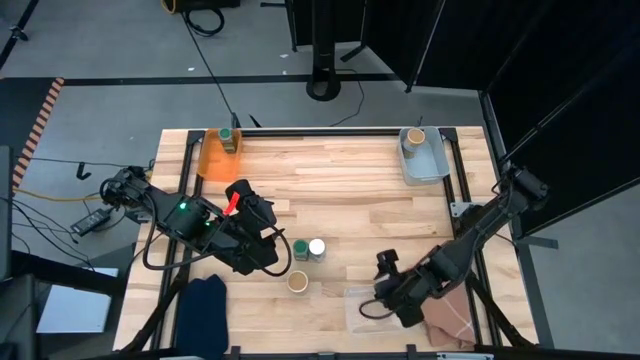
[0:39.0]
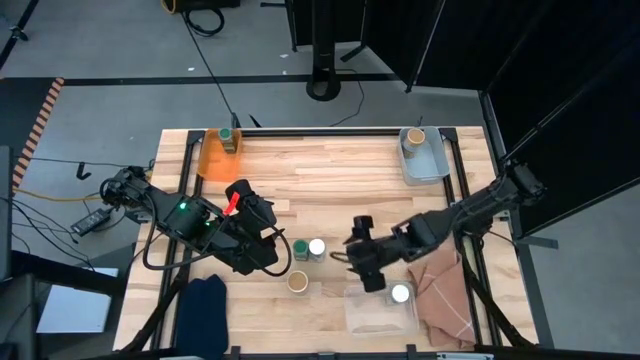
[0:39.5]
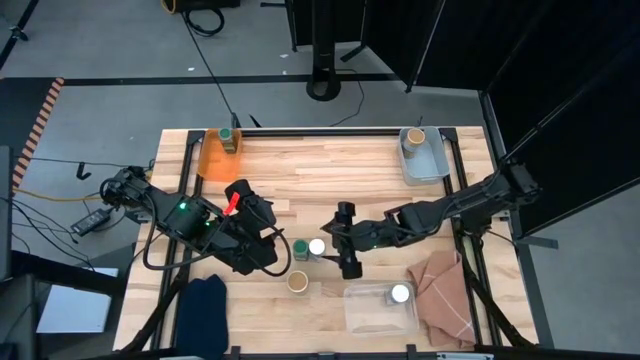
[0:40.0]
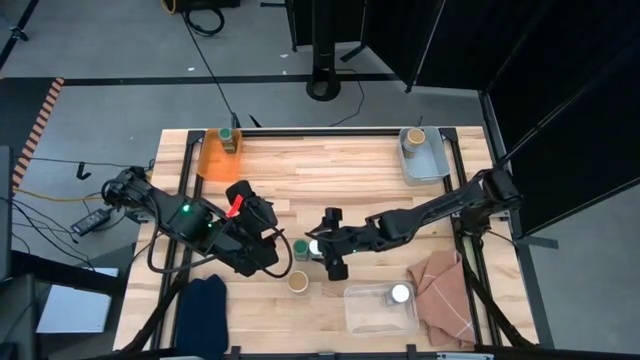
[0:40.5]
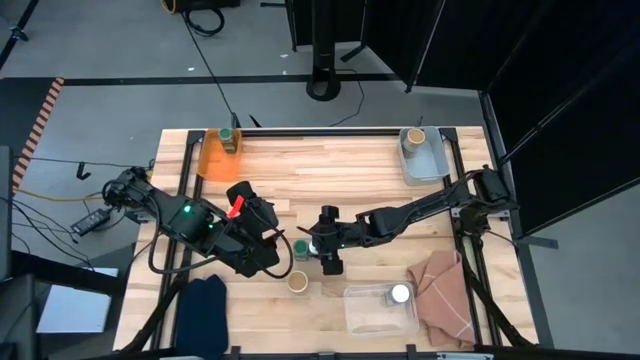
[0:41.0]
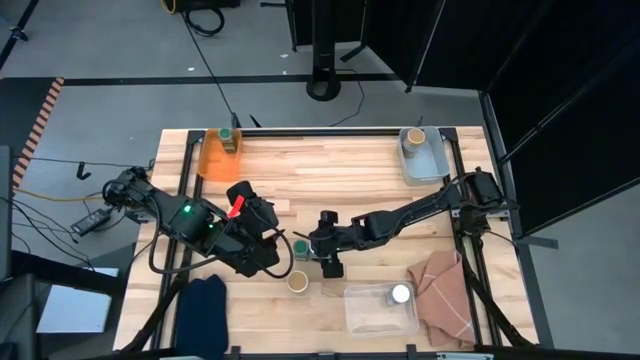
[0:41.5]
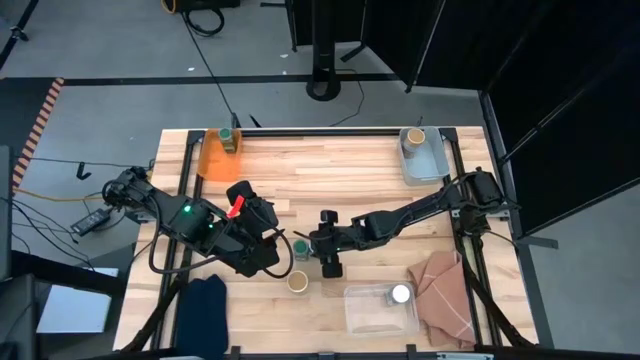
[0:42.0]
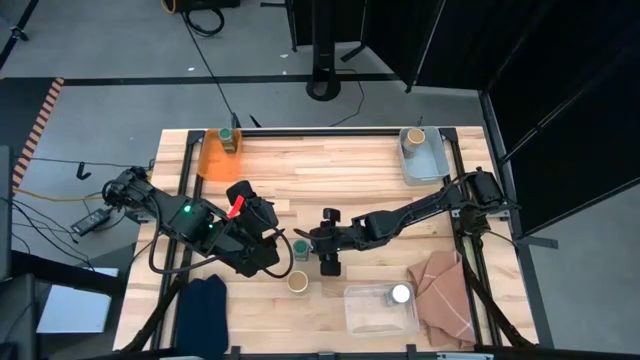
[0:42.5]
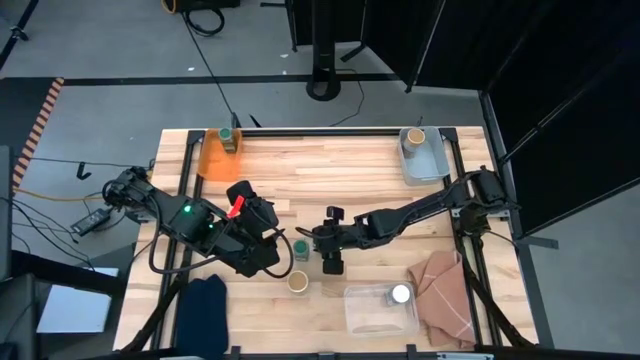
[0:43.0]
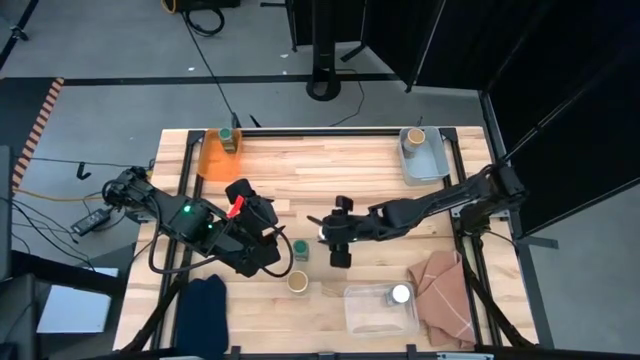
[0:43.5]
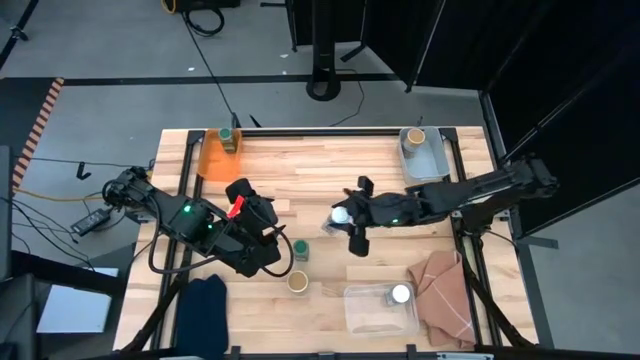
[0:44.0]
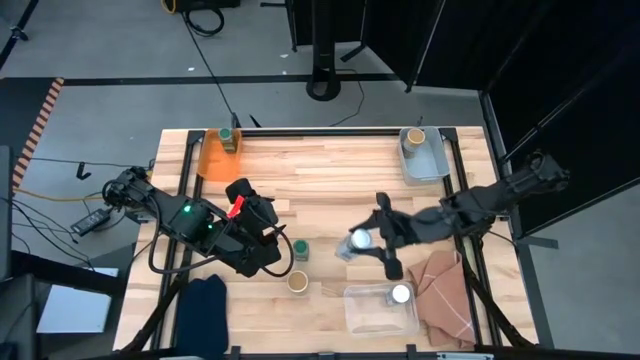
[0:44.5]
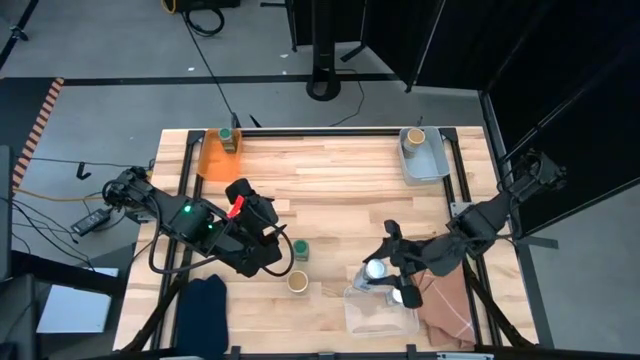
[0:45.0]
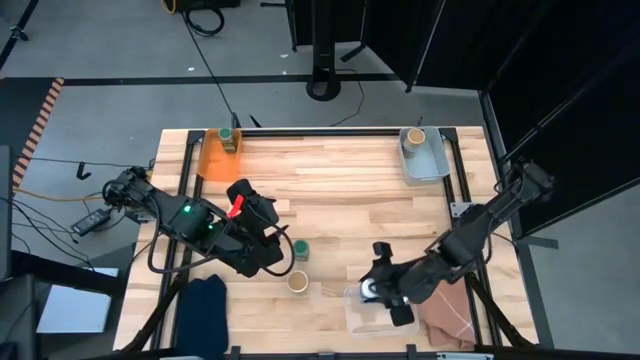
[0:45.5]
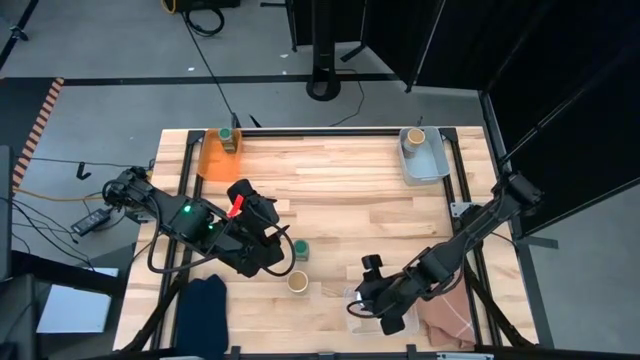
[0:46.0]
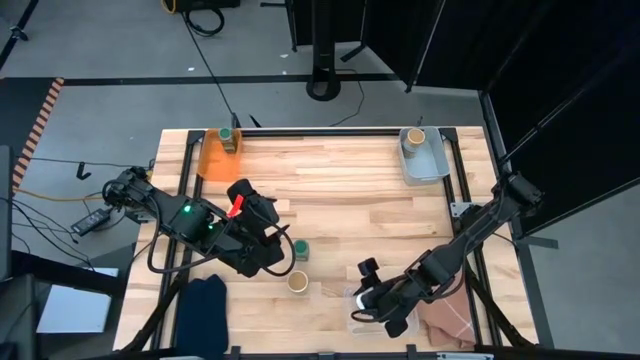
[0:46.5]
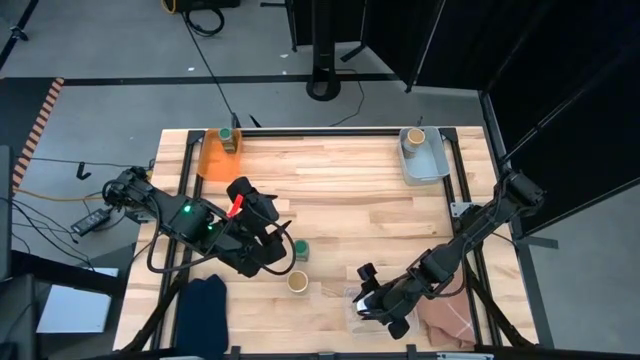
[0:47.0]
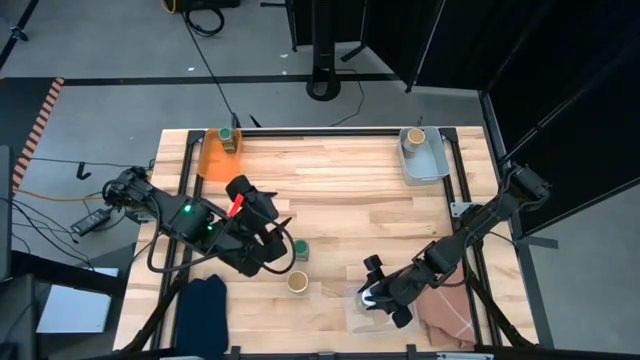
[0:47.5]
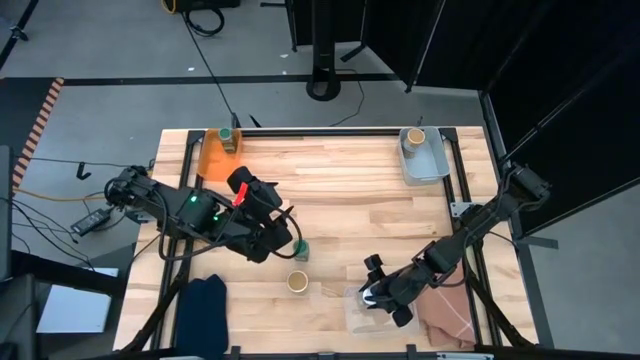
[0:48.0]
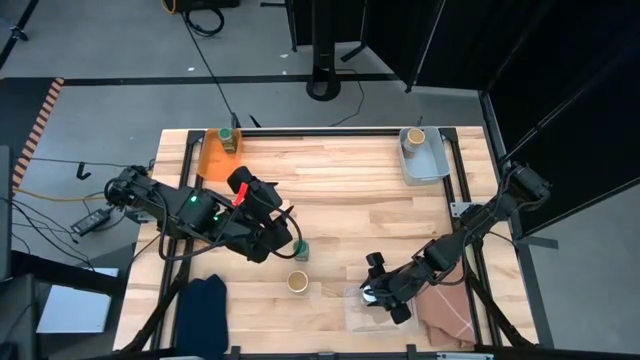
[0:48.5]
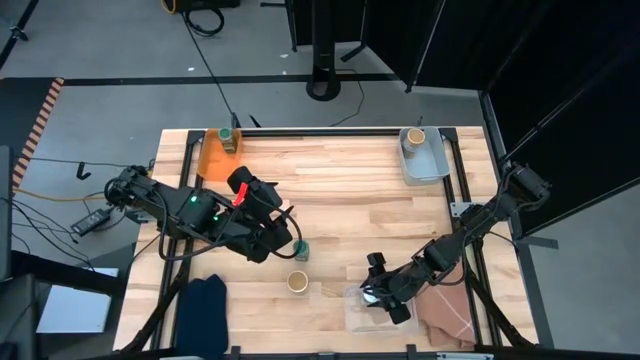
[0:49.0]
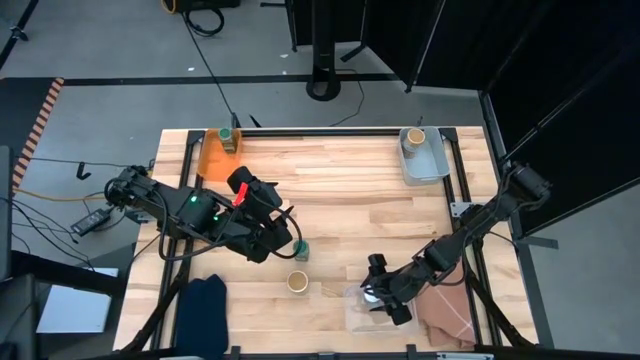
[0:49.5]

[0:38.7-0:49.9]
Task: Sort spices by type
Put the white seasoning bottle into the transparent bin

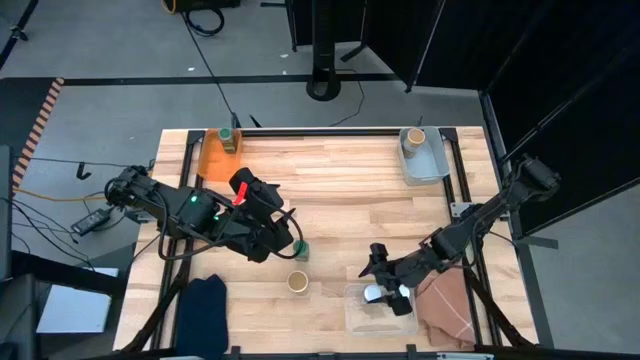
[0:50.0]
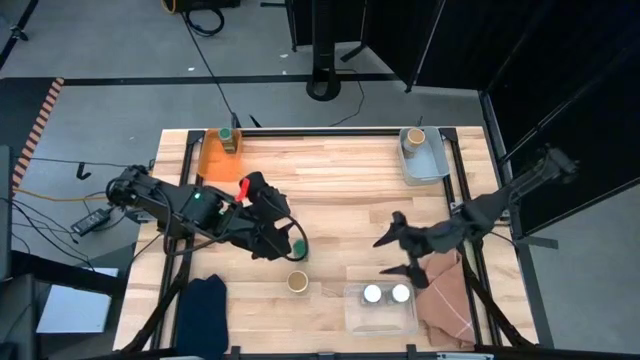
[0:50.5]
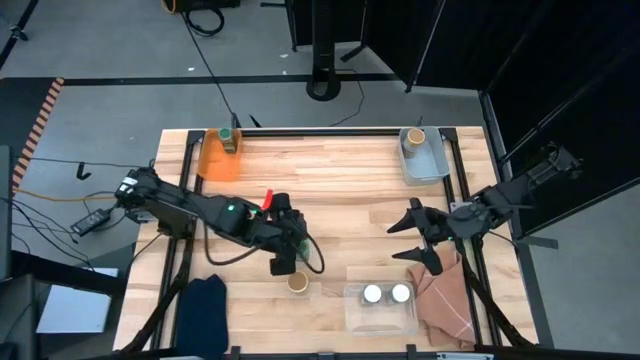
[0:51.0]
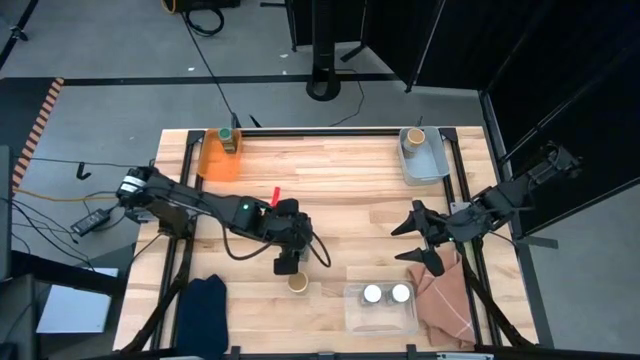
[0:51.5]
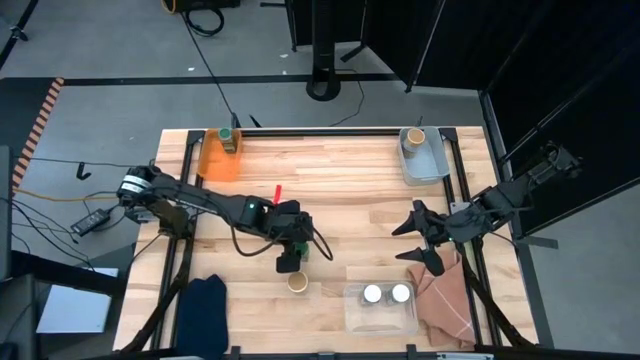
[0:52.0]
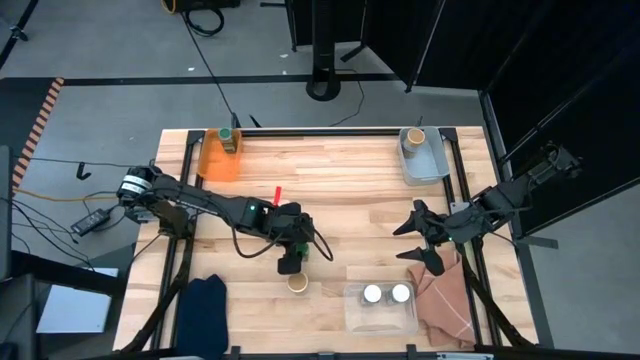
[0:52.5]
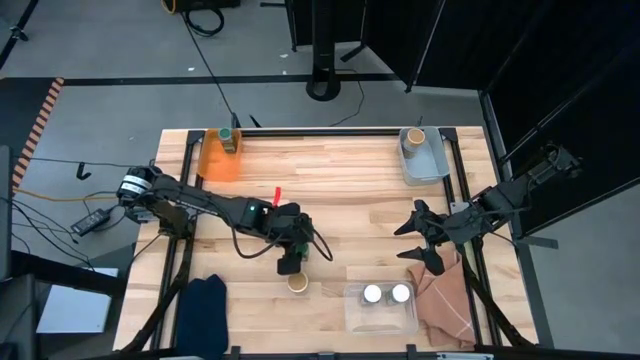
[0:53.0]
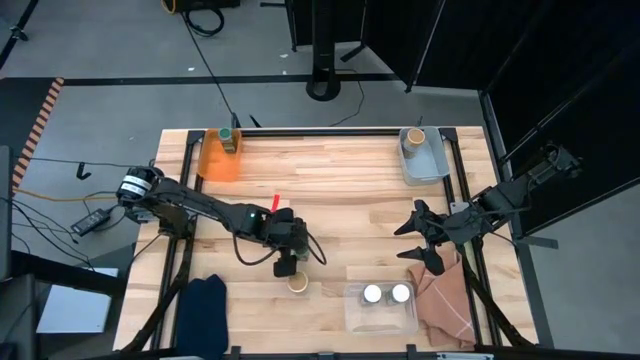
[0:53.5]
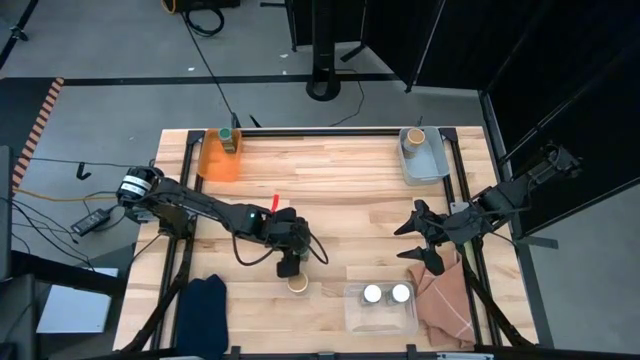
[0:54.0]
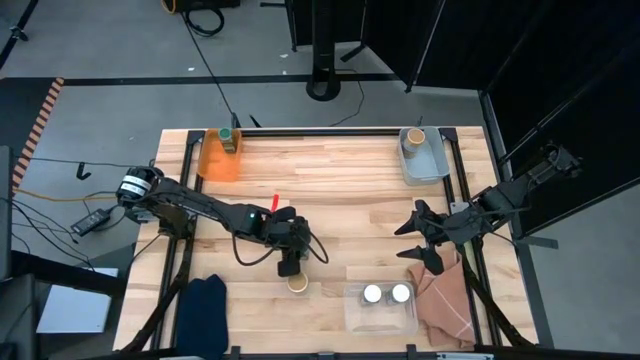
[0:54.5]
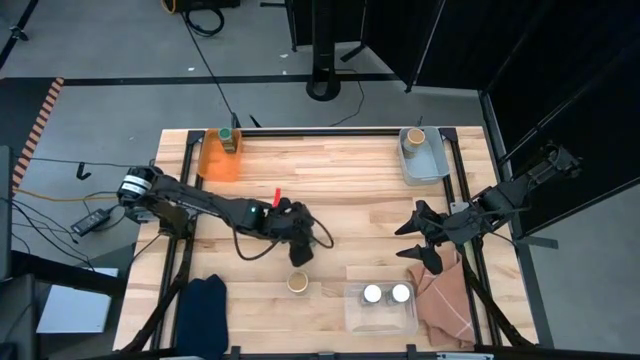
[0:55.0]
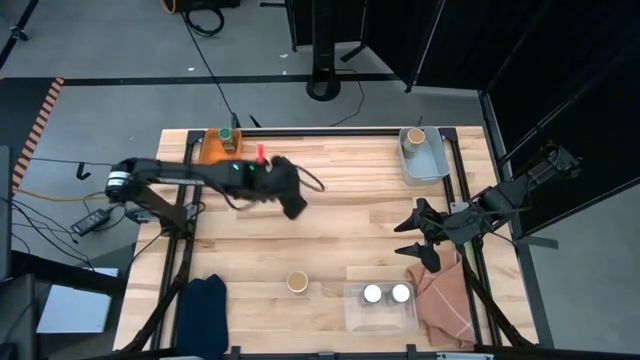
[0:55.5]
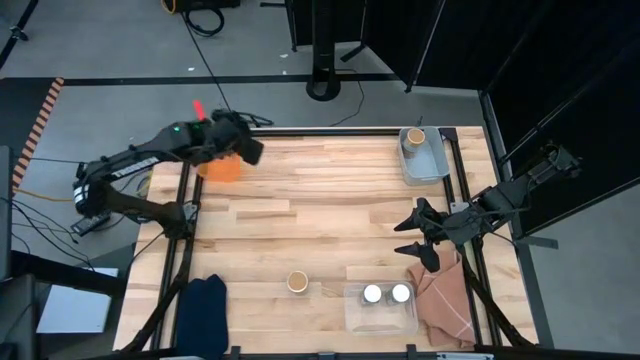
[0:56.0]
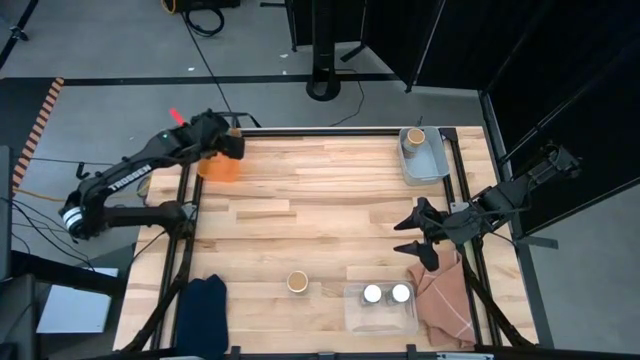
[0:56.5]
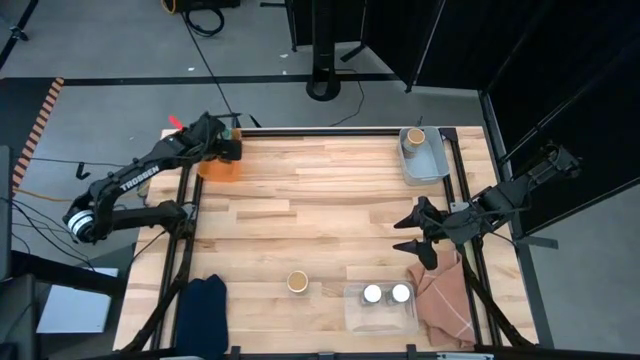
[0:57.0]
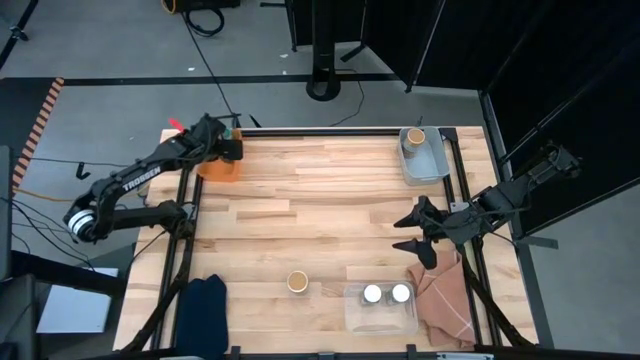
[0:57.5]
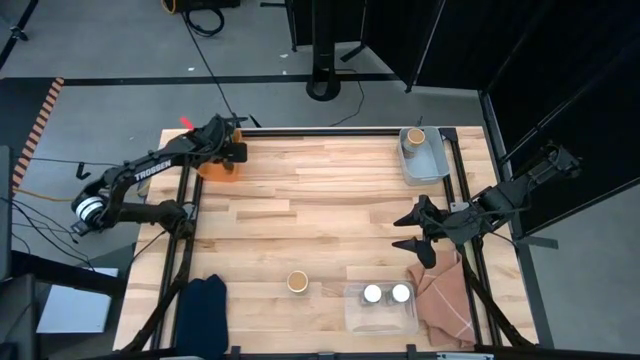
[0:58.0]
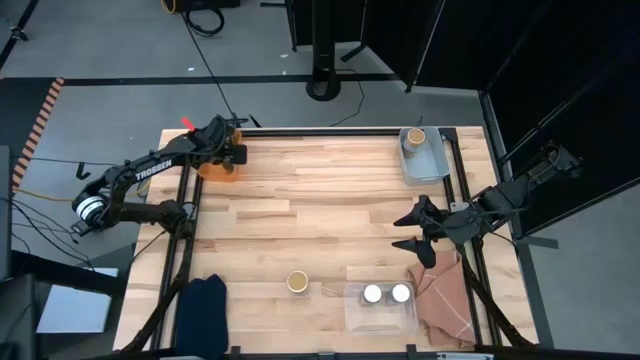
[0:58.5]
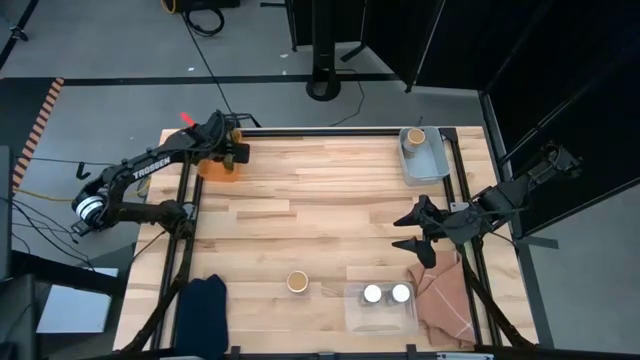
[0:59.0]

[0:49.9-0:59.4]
Put the green seasoning bottle into the orange bin
